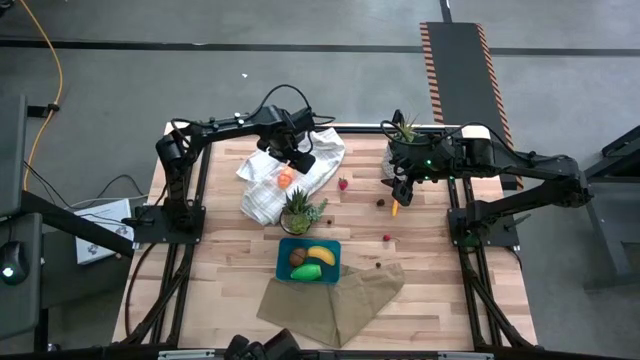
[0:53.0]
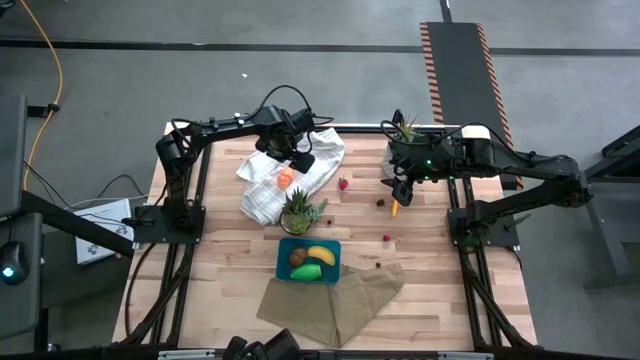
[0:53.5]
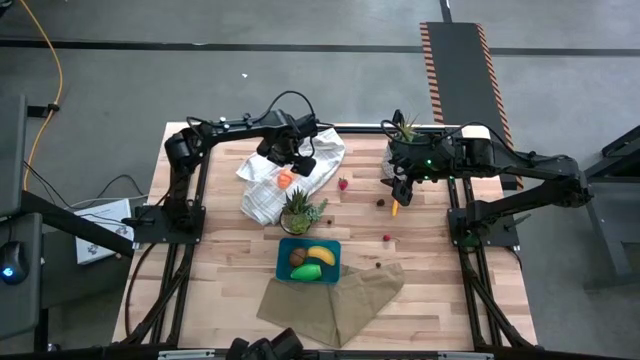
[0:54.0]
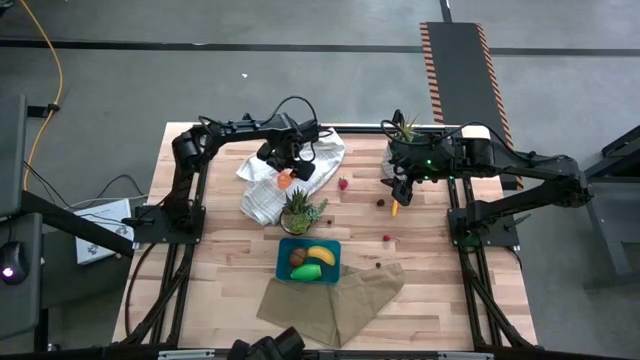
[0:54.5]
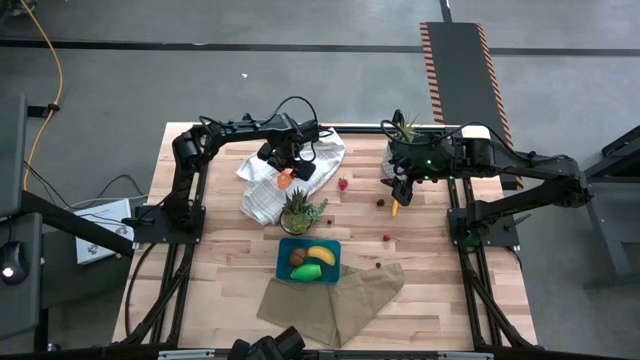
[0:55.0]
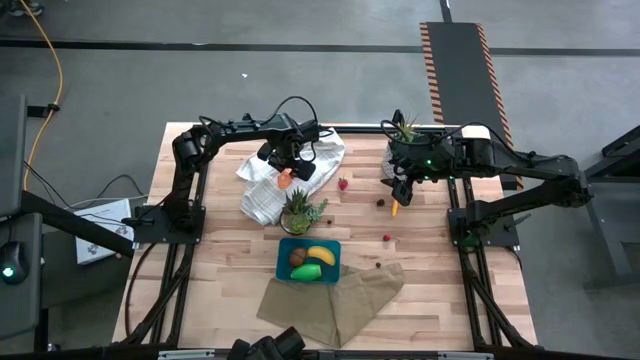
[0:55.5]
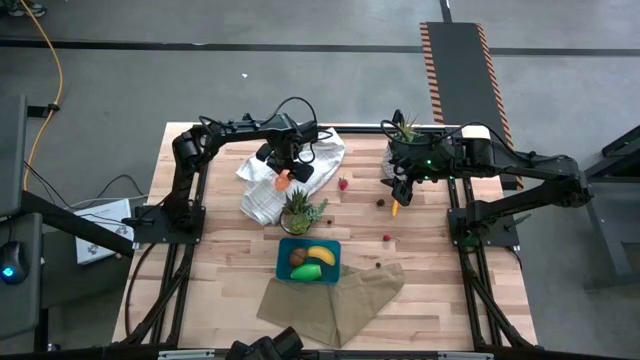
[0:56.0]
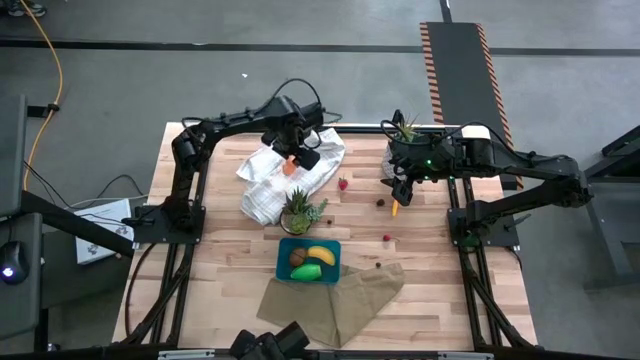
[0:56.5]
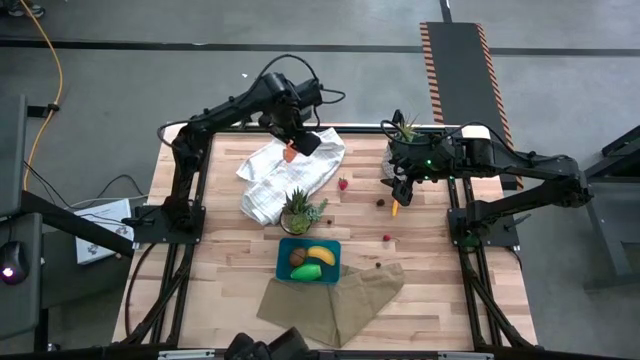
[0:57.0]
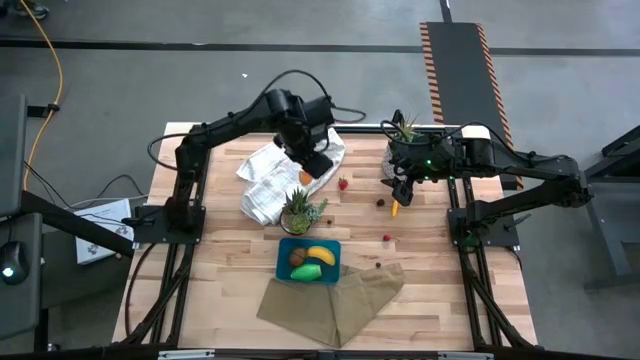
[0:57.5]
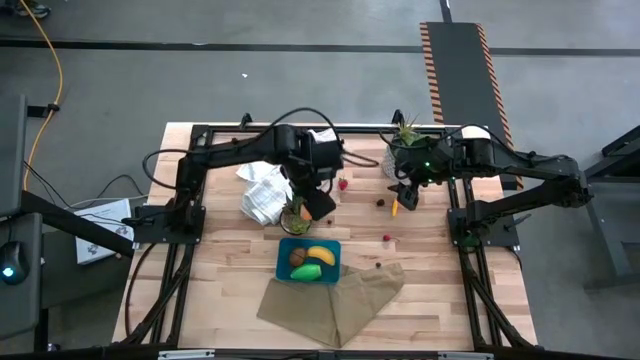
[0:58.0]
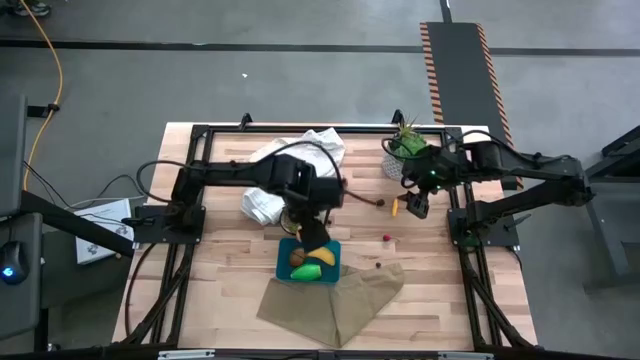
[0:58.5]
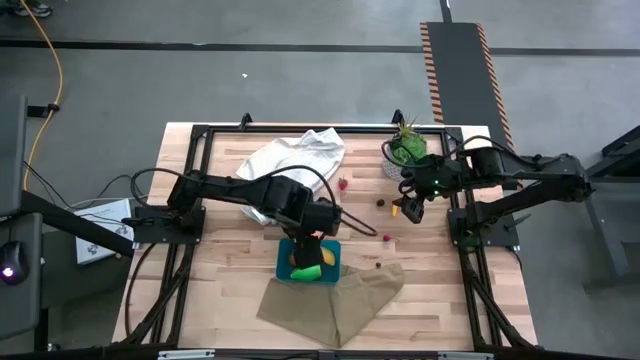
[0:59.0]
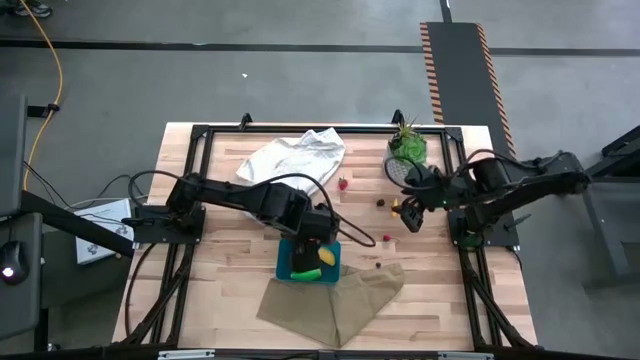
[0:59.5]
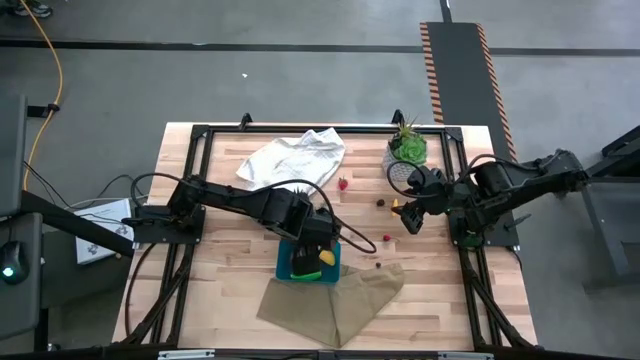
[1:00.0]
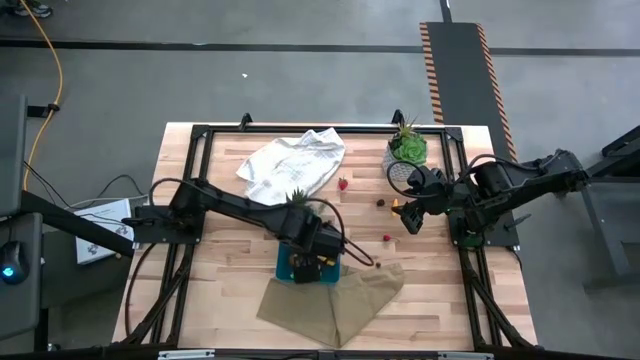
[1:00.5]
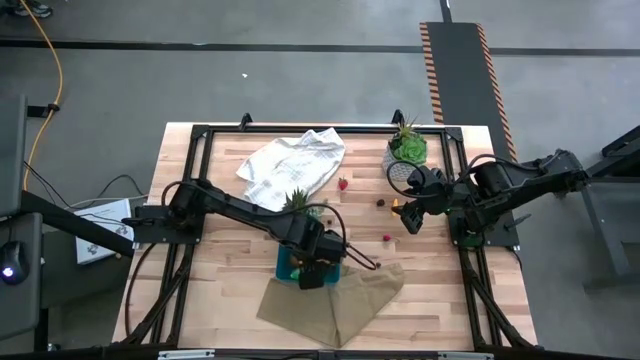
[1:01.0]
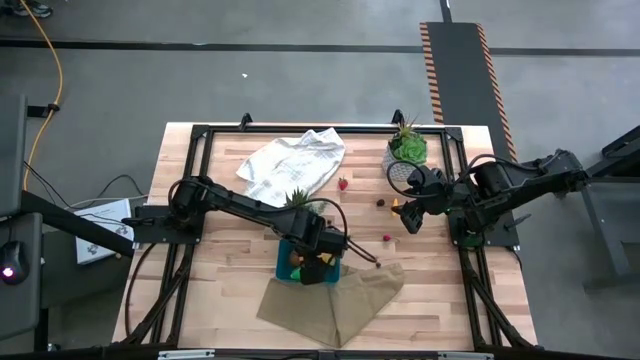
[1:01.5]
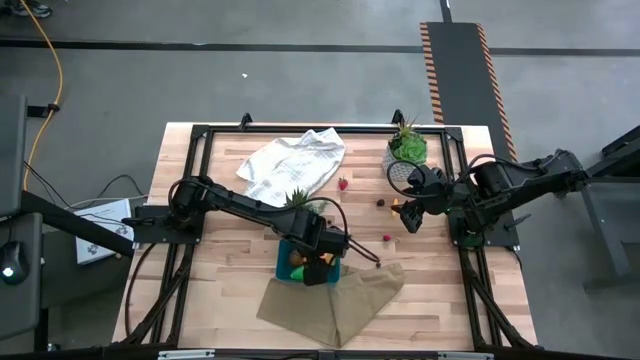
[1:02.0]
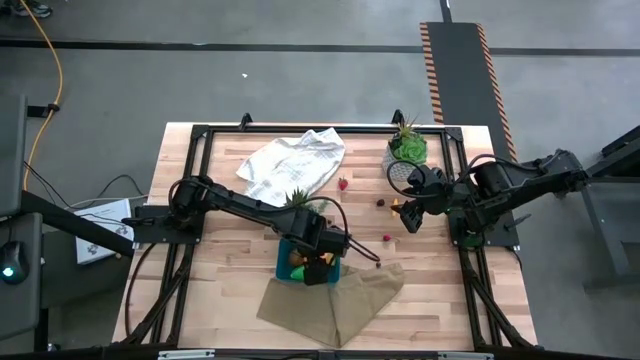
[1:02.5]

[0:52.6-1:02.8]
Task: Pick and placing Produce into tupperware
Put the pumpkin into the blue bin

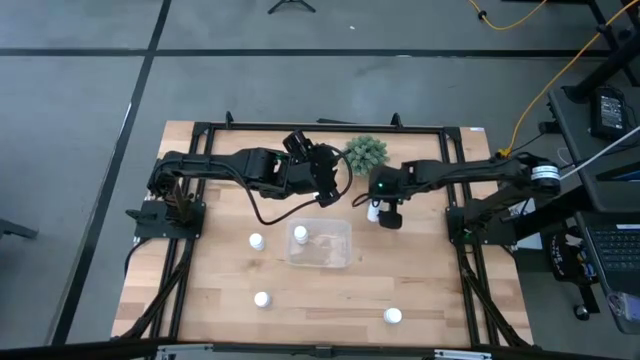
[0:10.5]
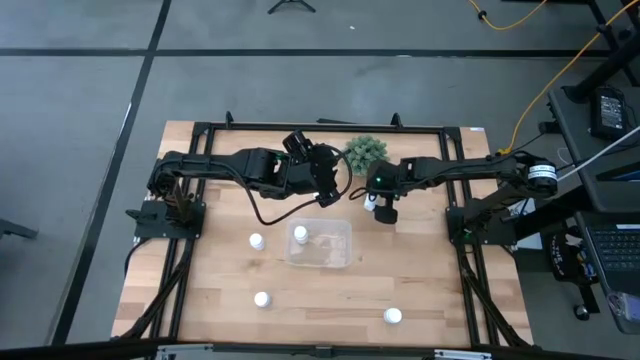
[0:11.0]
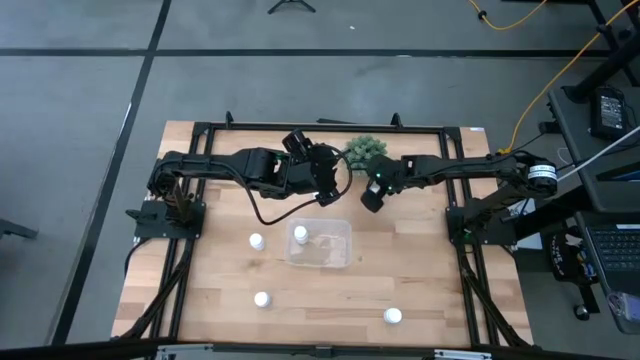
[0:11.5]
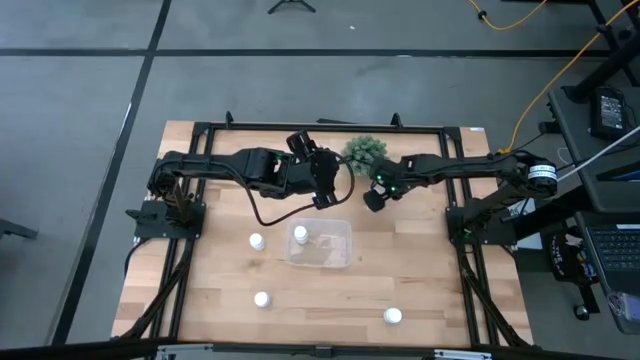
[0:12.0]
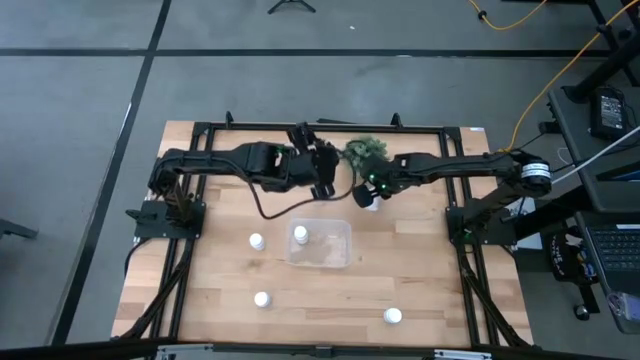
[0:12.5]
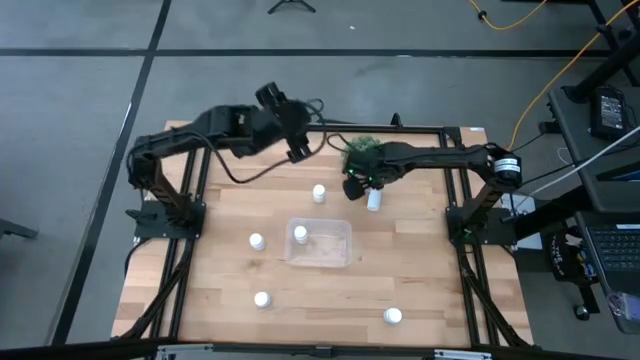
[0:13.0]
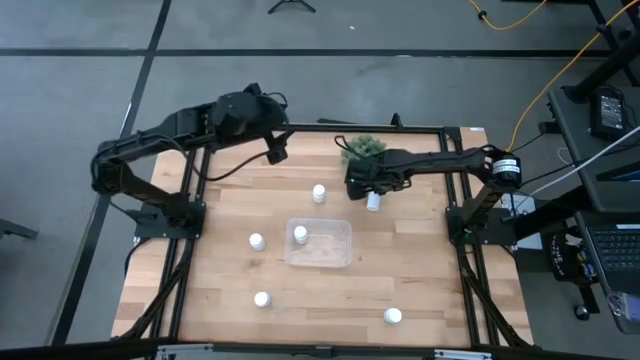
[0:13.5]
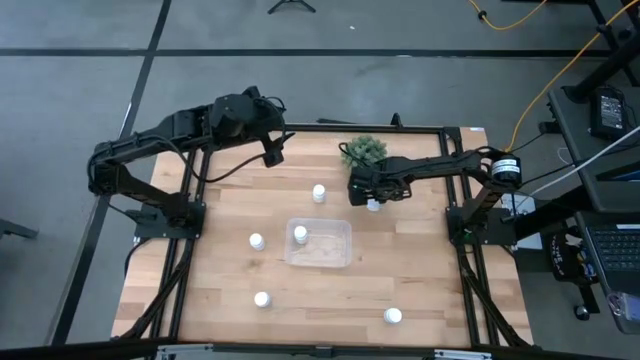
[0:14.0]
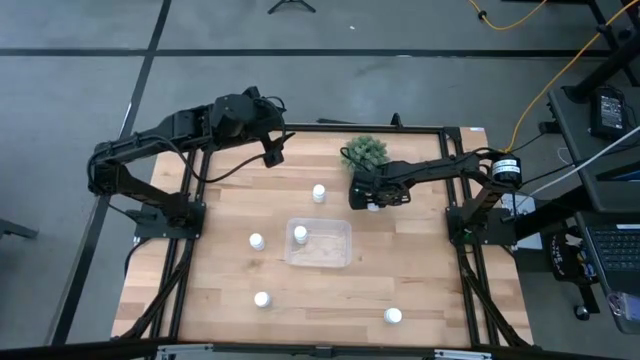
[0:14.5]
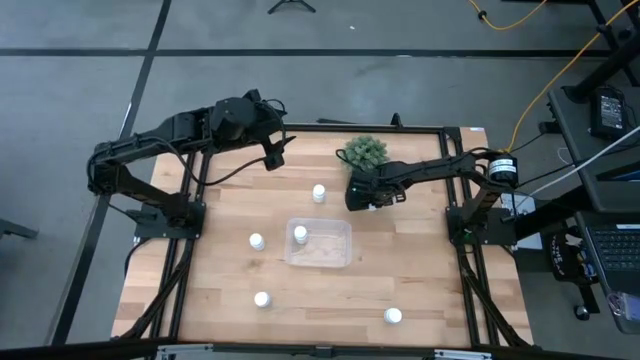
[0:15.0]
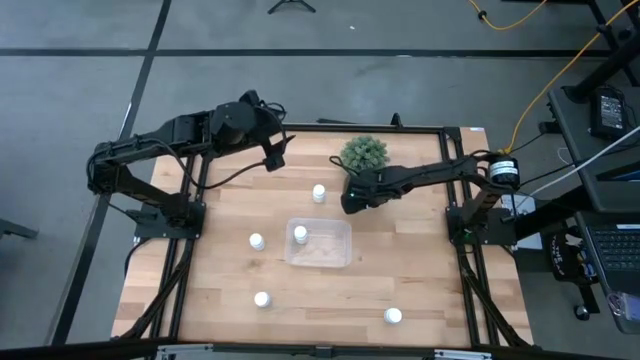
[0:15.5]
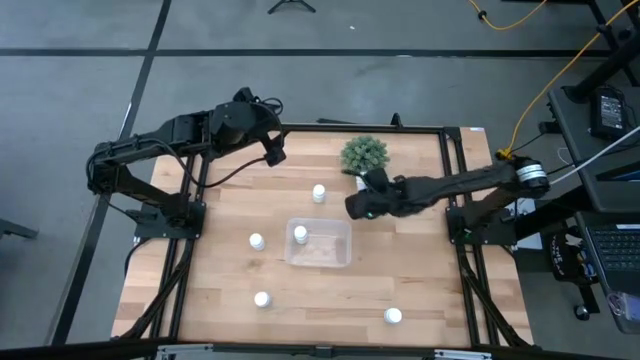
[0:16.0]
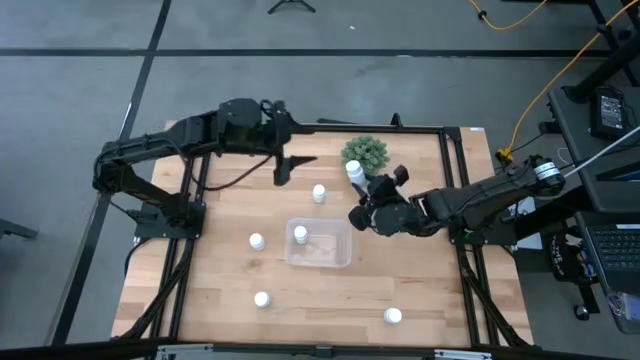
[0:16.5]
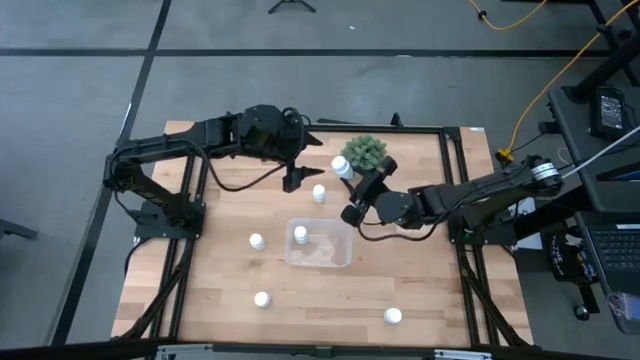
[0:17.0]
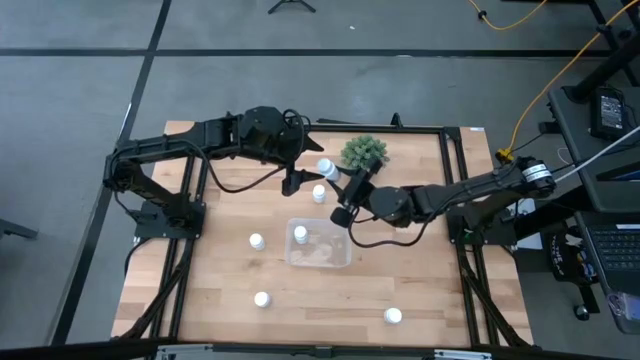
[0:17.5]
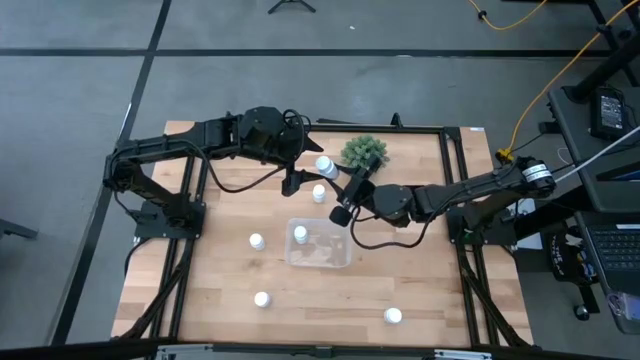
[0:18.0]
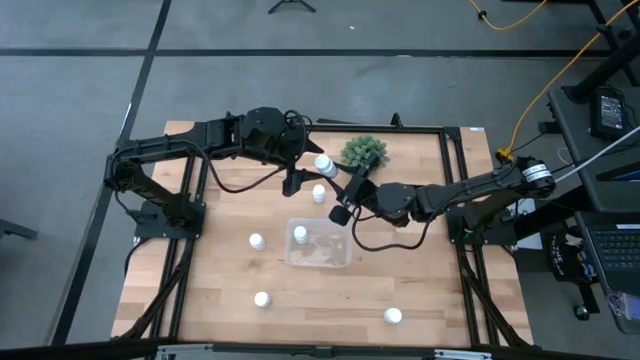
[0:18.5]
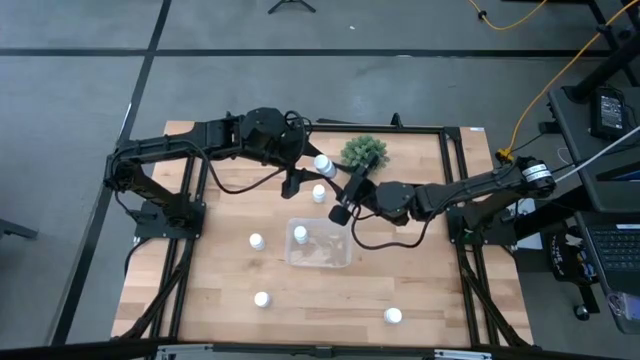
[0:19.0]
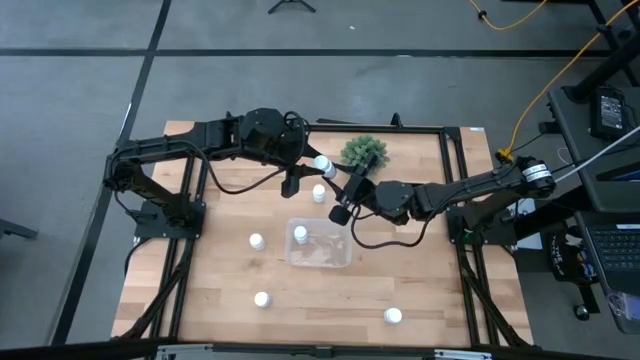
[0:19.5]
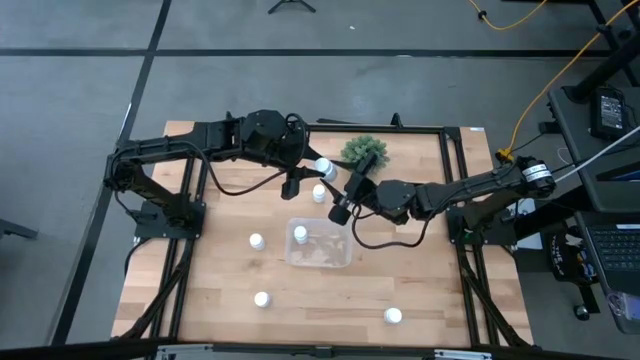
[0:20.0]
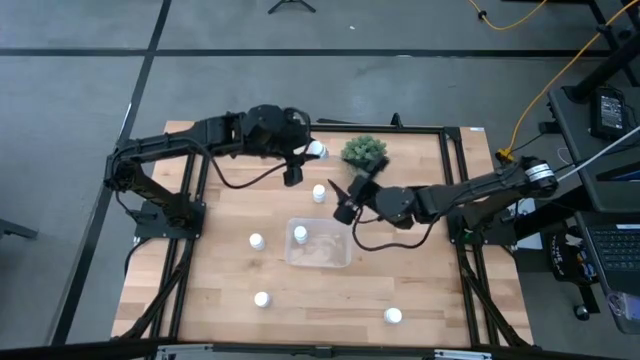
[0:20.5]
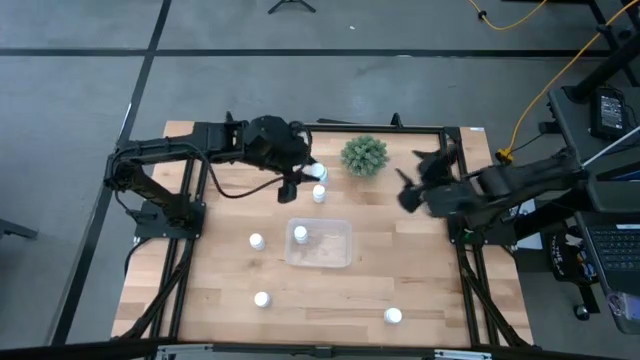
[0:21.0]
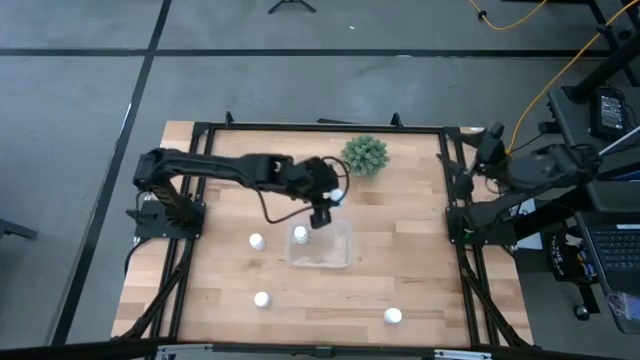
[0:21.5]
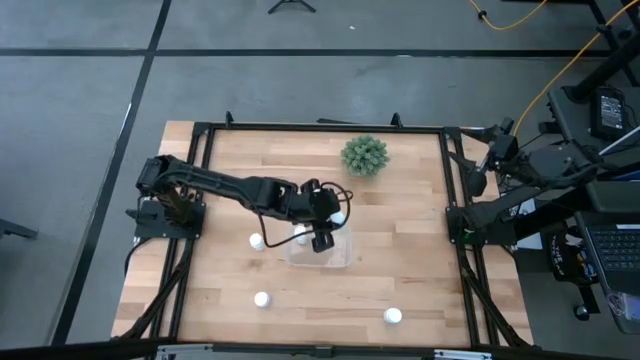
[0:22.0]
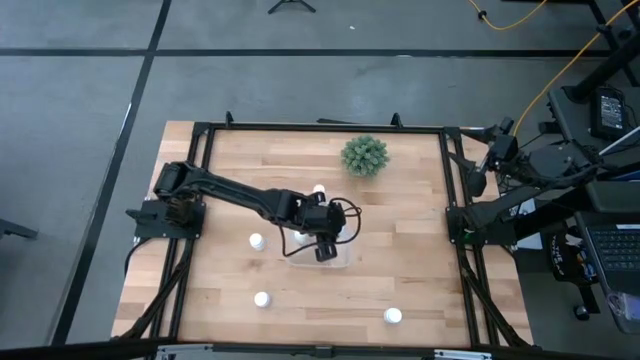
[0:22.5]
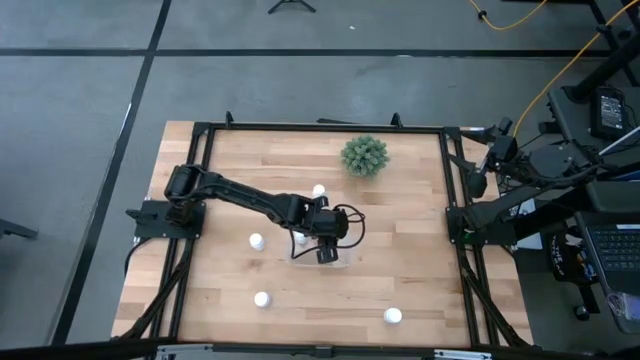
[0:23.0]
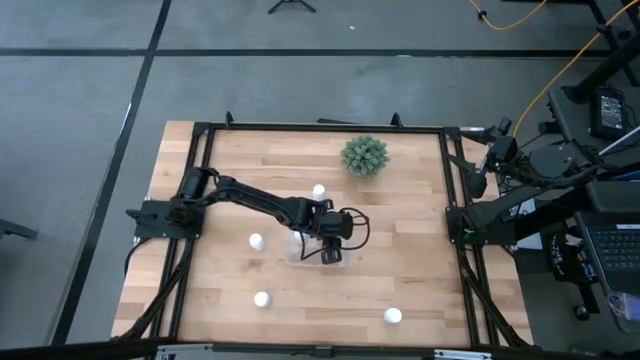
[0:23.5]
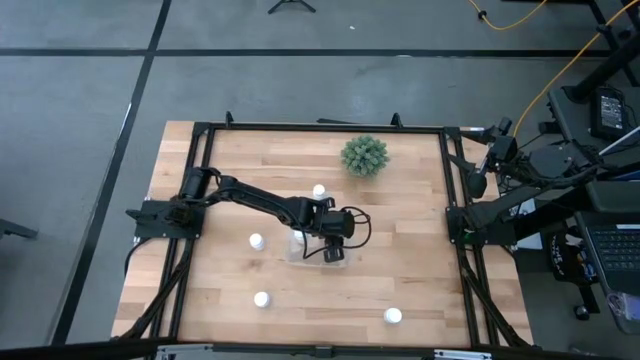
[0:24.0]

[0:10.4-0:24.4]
Task: Pick and place pill bottles into a basket
Put the white medicine bottle into the transparent bin
